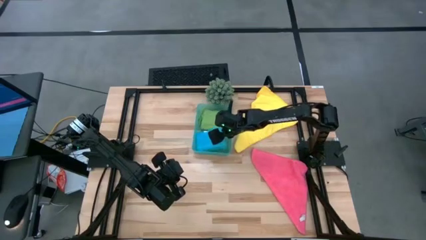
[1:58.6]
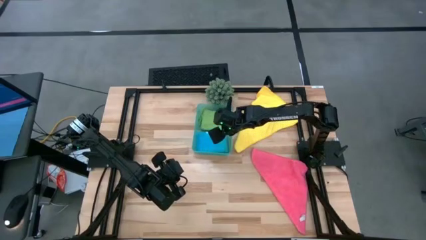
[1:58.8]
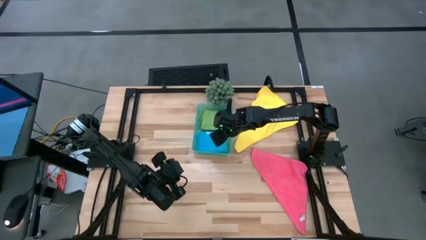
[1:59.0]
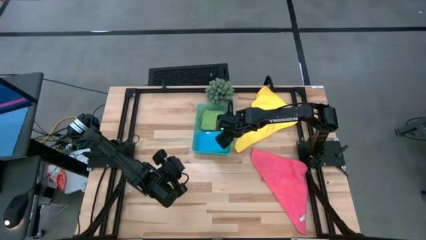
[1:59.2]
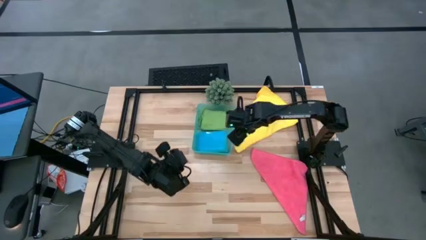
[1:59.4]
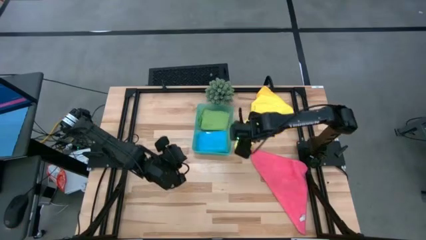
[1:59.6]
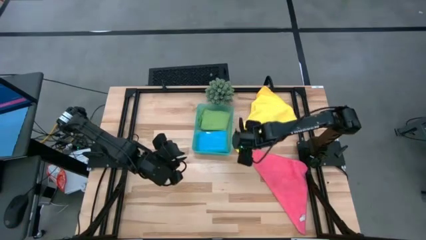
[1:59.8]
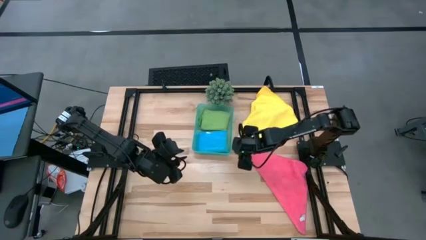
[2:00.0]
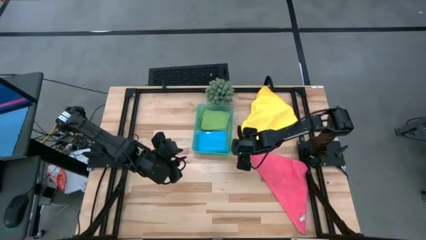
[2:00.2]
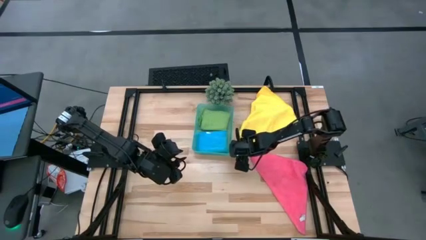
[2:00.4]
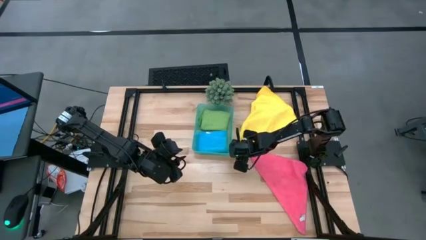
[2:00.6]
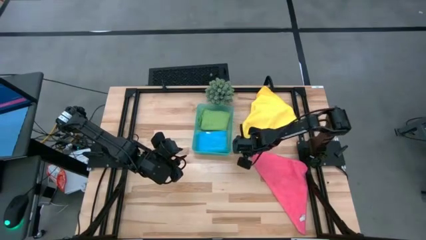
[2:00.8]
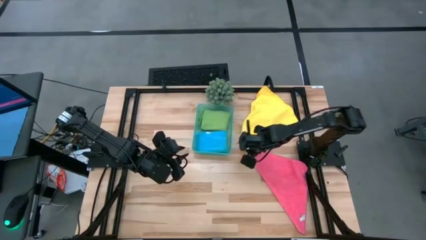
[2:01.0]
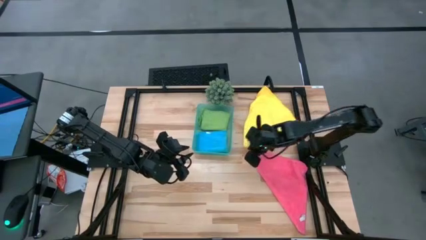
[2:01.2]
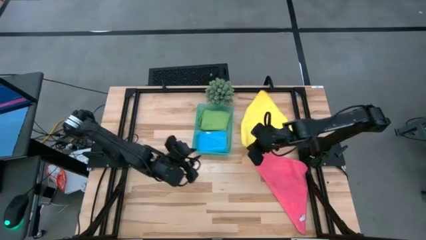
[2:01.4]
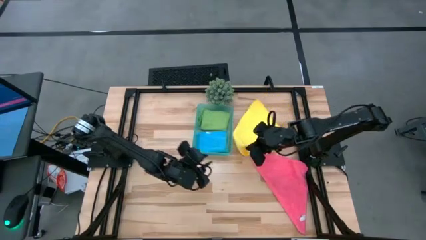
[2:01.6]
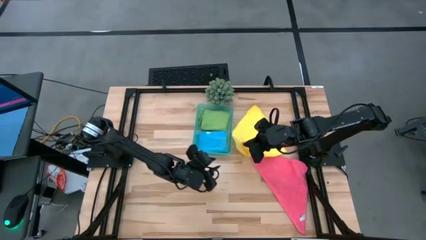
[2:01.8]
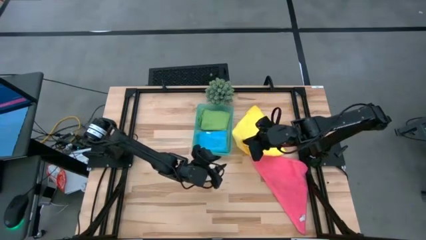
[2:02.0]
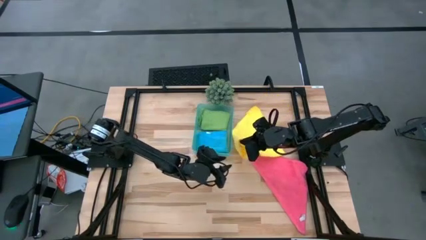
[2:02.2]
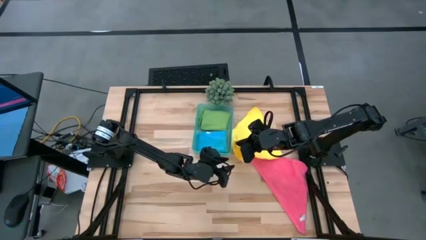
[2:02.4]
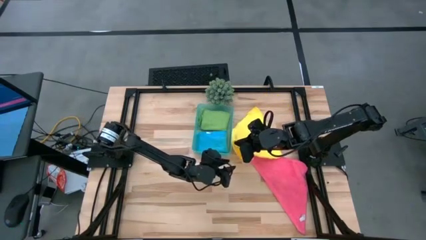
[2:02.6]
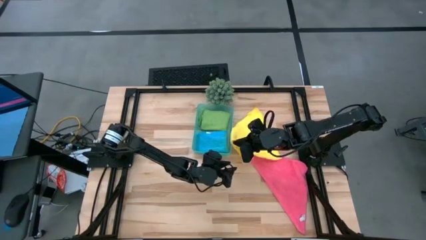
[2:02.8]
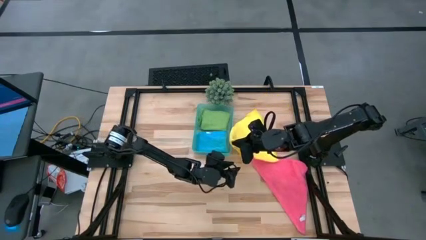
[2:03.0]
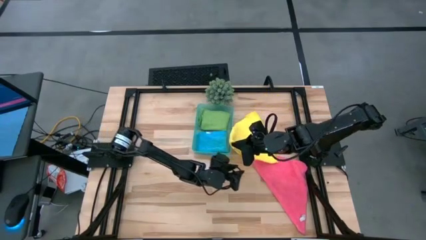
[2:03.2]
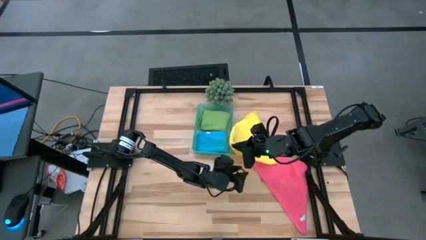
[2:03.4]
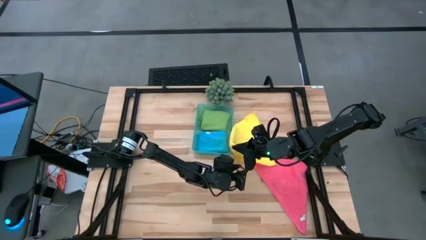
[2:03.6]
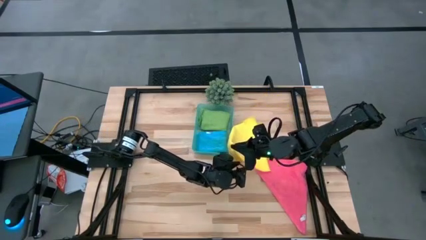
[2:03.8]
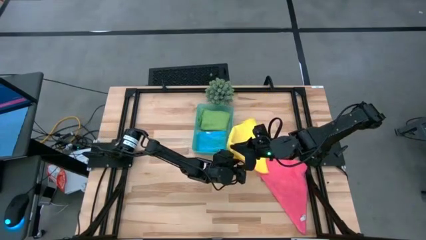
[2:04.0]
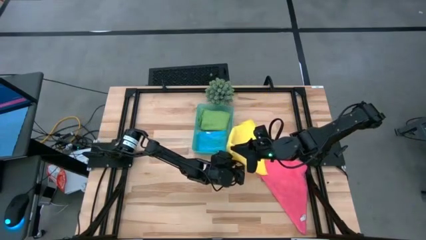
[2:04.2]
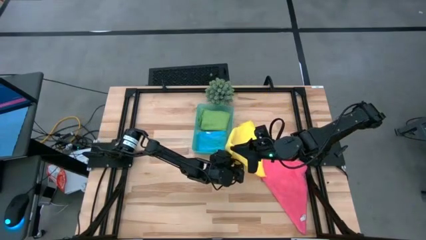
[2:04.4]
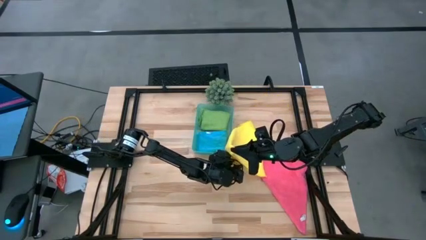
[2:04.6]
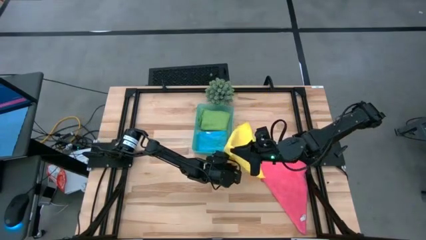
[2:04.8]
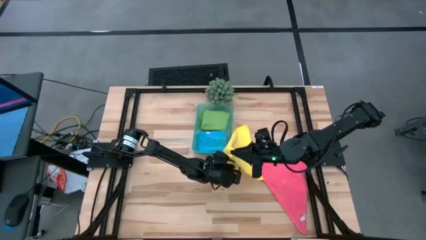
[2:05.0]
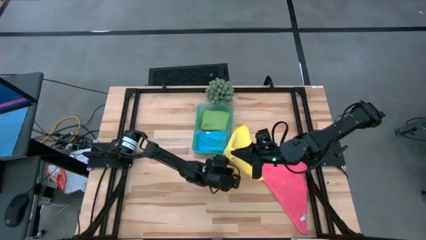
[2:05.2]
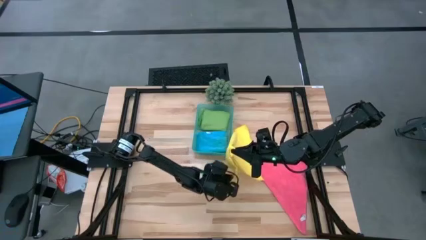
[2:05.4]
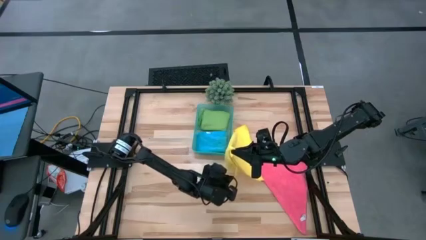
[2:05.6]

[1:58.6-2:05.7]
Task: Fold microfiber towels
Fold the yellow micro fiber cloth

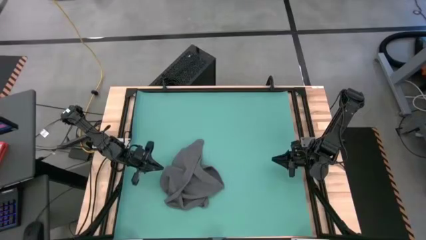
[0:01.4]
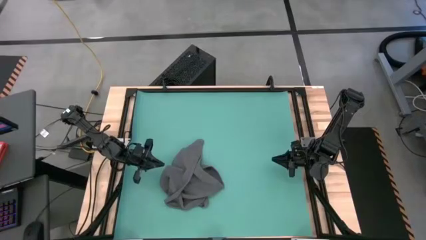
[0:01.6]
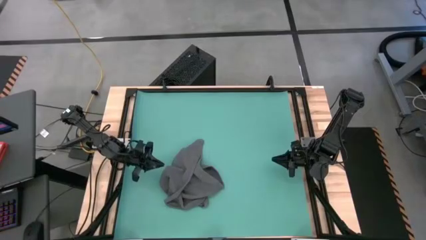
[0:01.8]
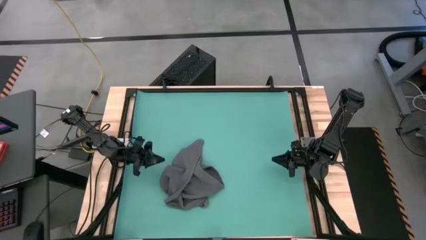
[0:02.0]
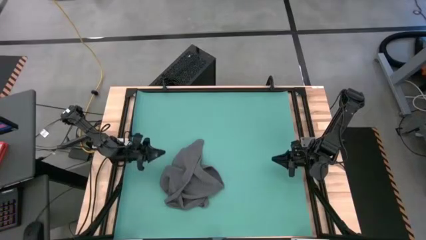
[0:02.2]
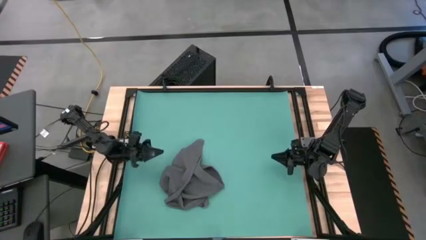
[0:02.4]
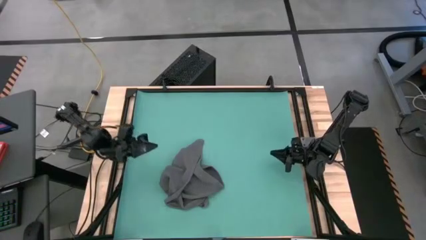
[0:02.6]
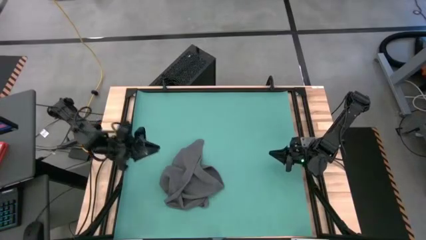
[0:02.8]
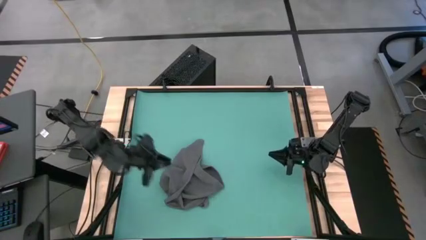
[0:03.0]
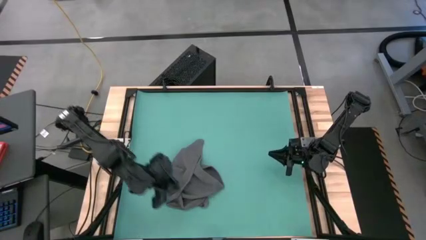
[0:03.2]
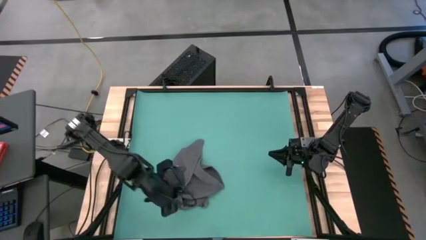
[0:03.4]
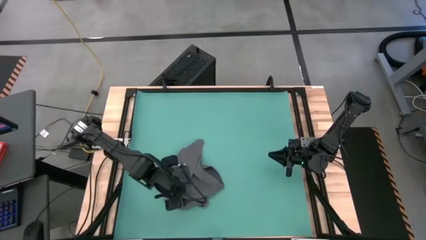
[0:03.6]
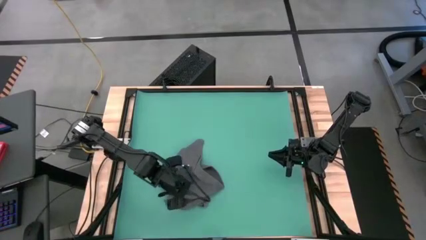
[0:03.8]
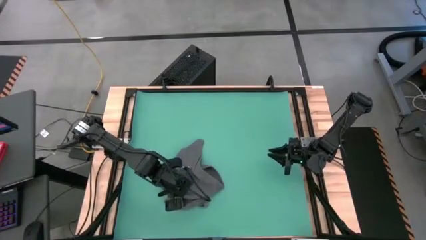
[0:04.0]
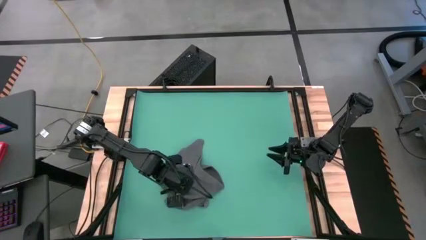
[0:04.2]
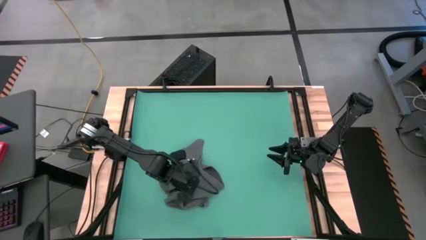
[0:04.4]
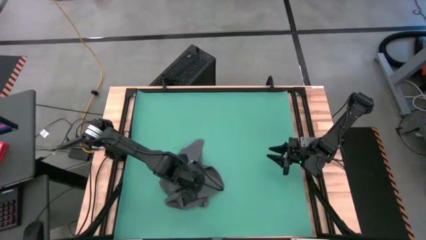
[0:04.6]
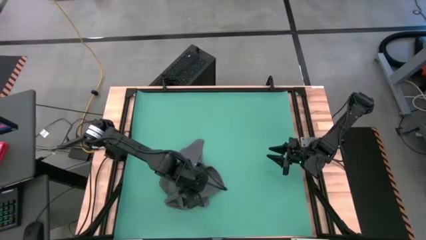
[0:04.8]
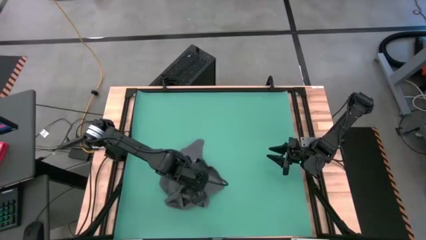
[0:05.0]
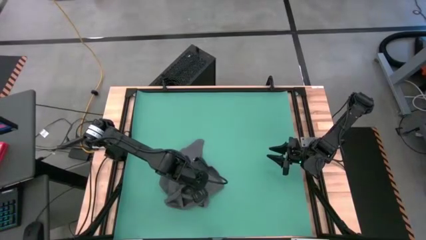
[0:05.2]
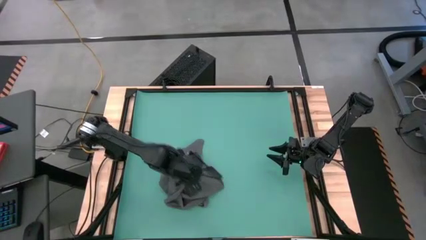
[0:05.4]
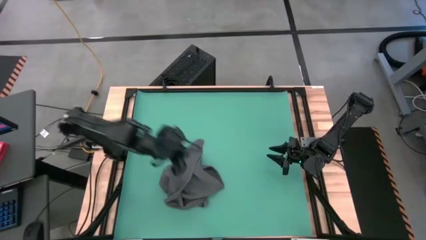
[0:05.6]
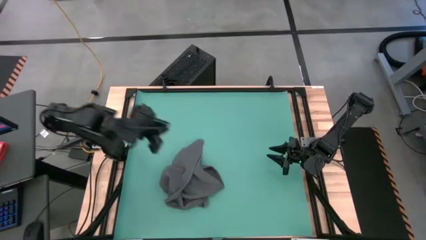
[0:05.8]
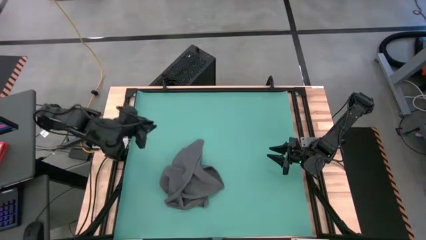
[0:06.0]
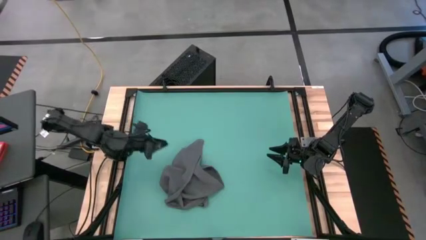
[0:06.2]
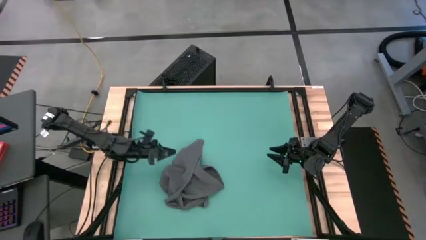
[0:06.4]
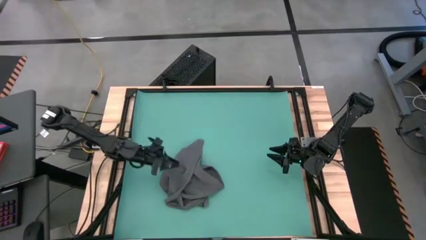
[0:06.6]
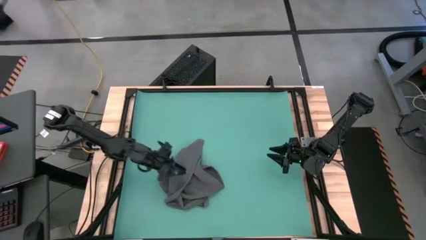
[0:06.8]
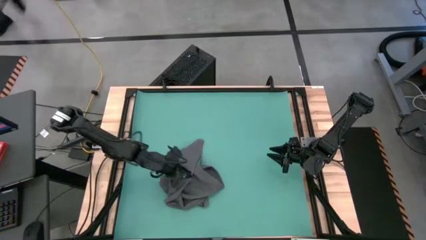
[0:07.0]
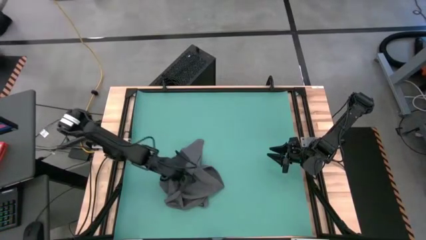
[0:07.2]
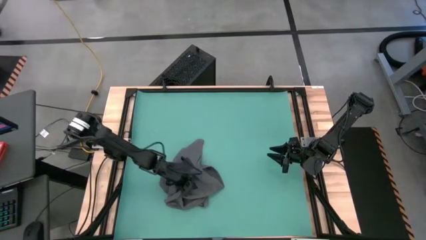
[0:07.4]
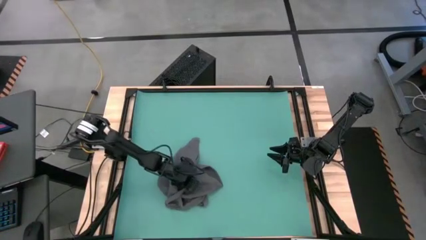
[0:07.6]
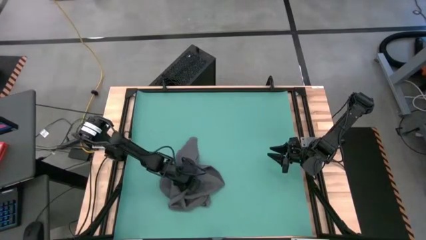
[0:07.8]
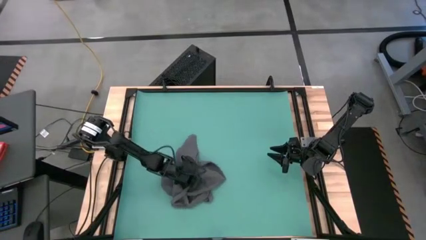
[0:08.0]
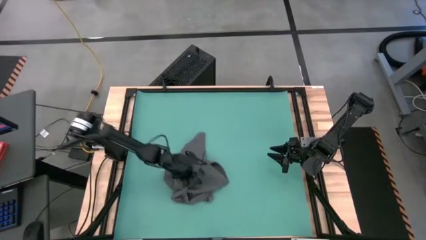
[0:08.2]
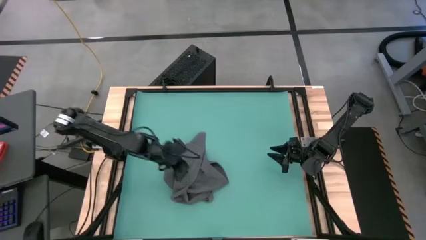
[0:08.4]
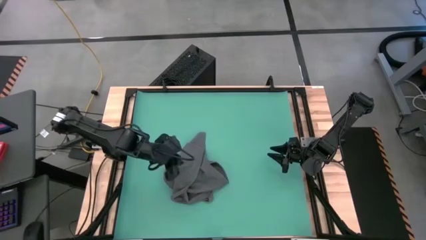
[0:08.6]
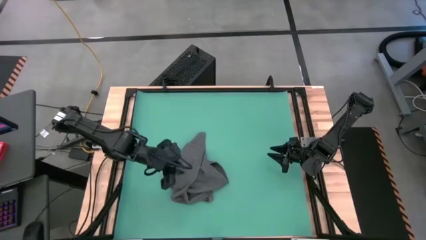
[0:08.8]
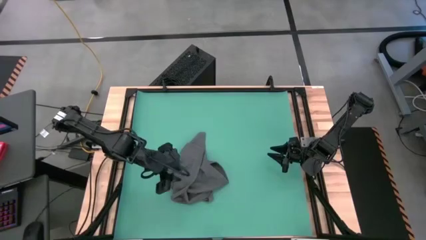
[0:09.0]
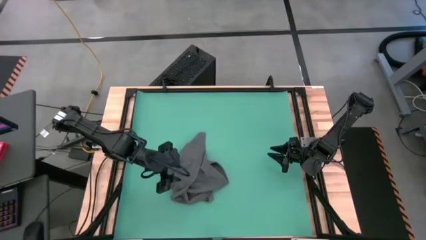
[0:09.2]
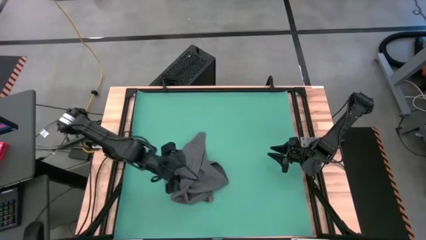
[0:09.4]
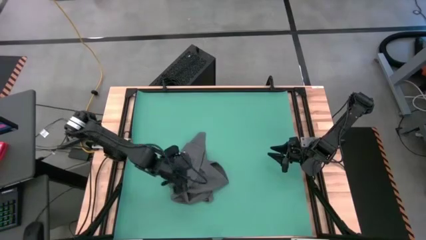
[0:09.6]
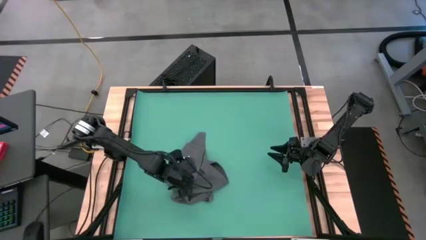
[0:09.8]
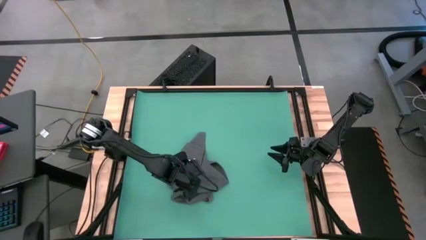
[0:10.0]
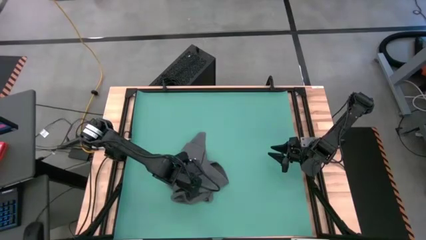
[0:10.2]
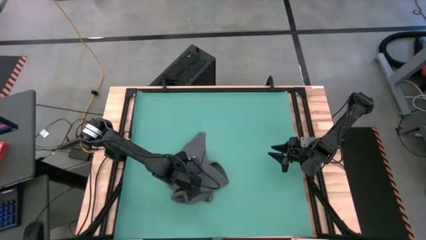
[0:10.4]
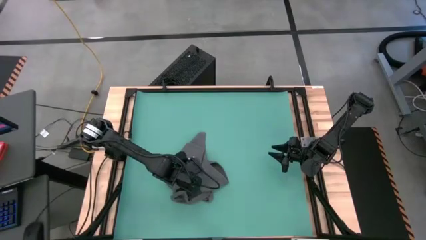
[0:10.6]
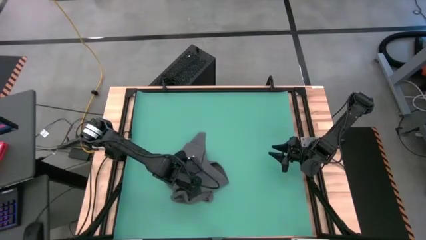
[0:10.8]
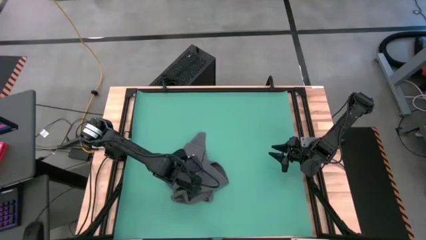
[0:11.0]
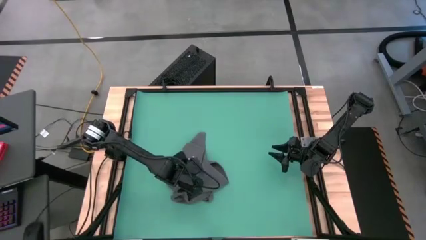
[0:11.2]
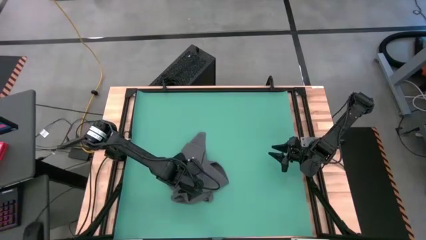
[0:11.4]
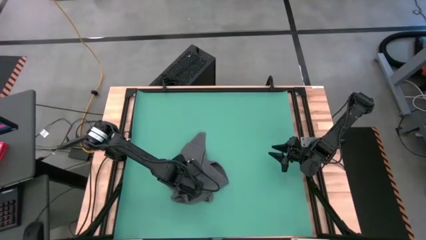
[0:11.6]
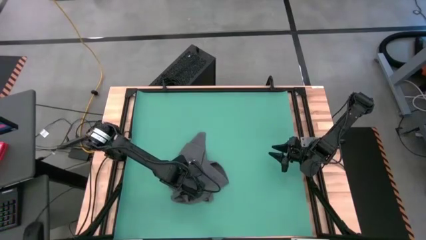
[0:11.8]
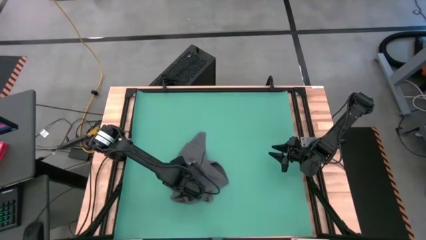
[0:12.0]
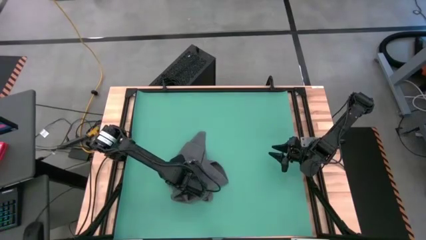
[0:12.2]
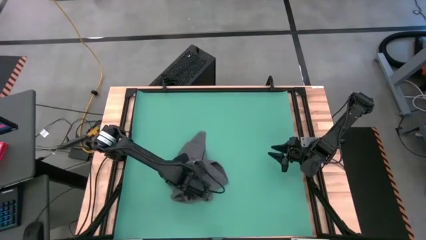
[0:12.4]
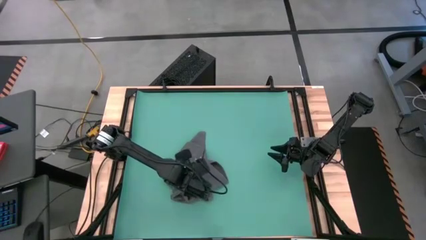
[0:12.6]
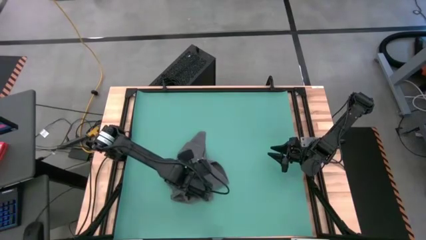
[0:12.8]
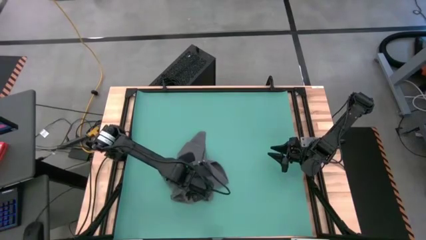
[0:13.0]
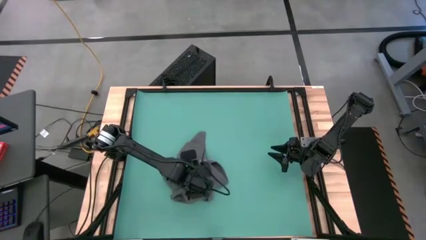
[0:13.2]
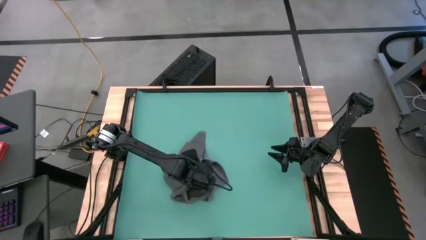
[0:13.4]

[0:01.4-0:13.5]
Task: Roll towel
Roll the gray towel on the table
